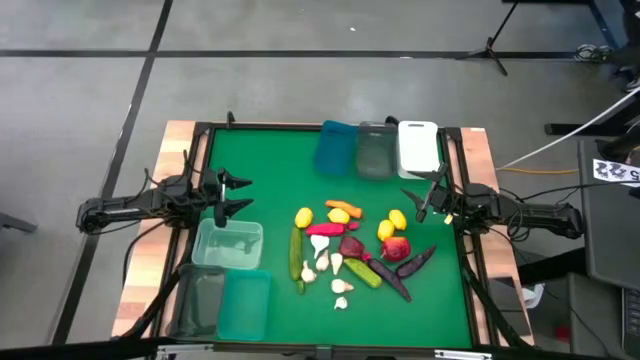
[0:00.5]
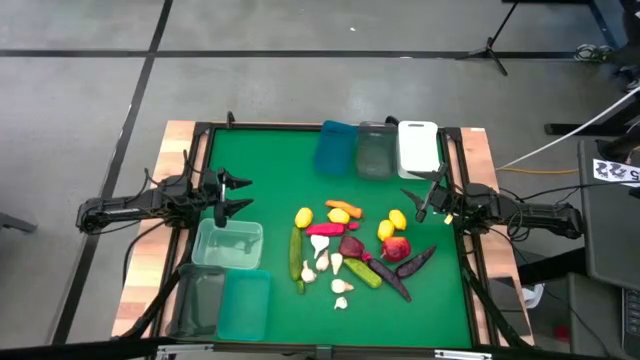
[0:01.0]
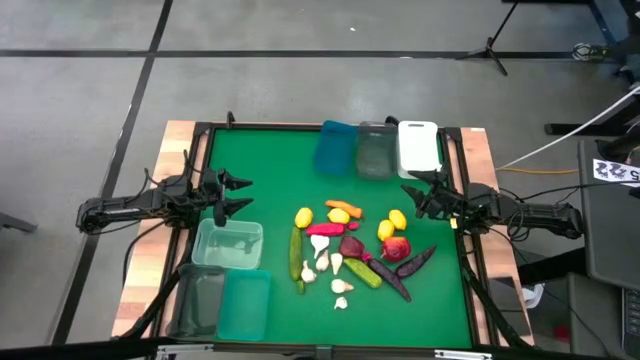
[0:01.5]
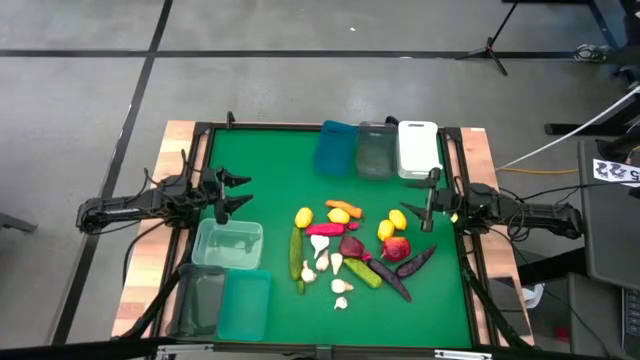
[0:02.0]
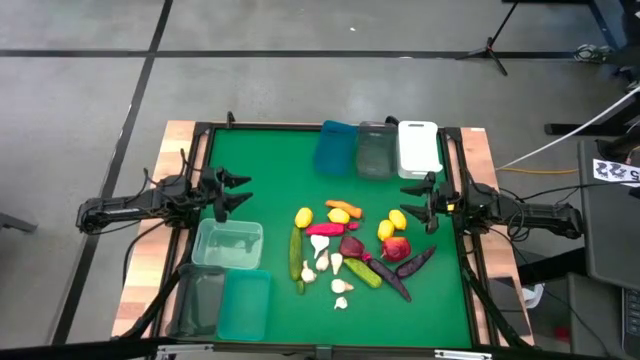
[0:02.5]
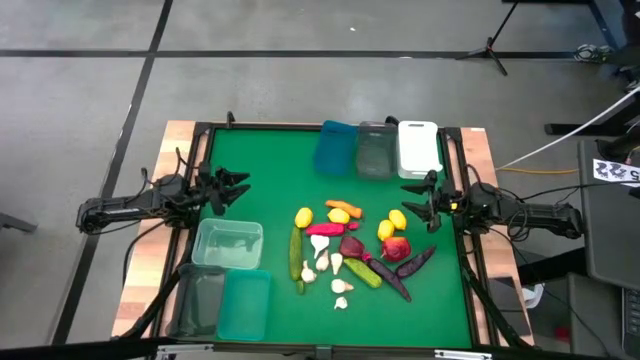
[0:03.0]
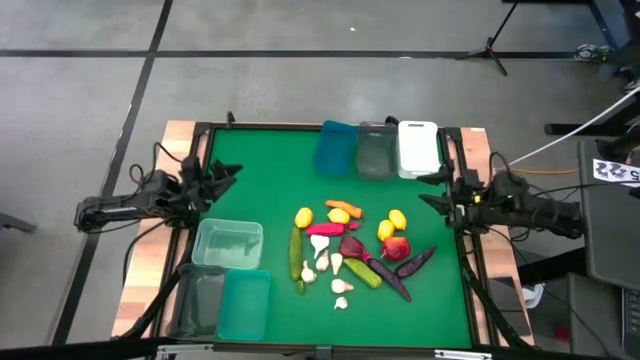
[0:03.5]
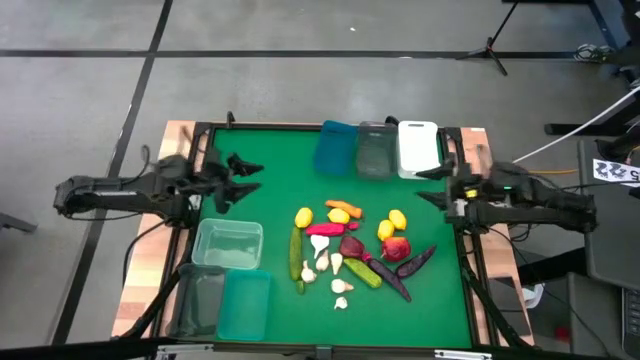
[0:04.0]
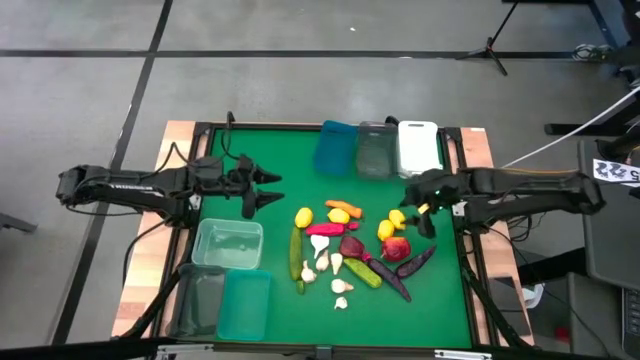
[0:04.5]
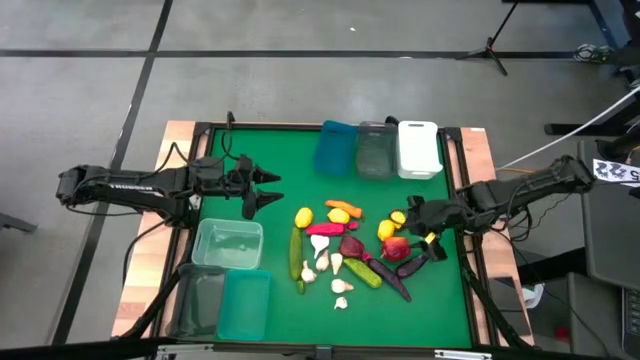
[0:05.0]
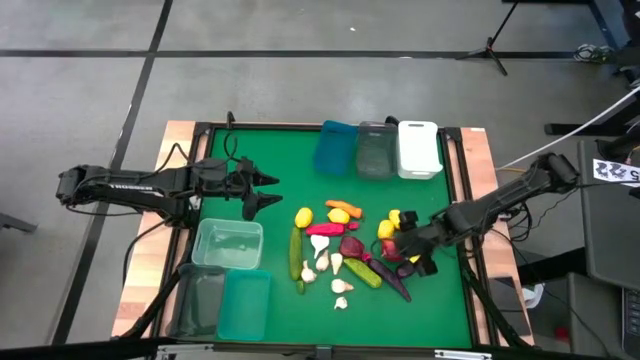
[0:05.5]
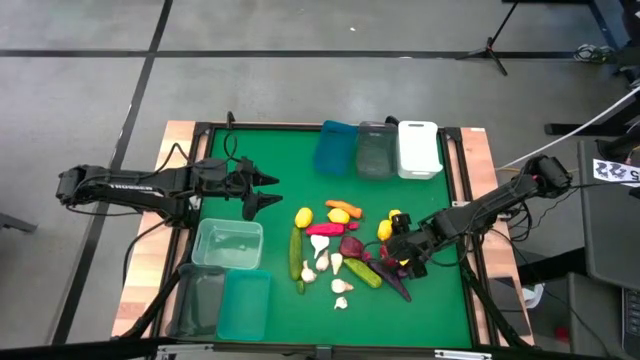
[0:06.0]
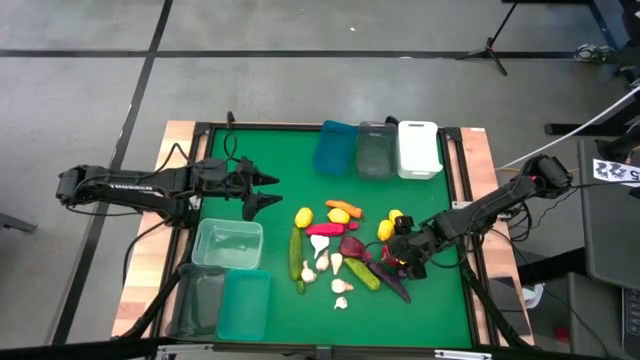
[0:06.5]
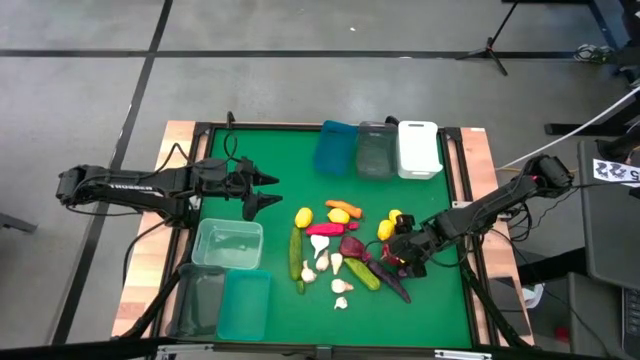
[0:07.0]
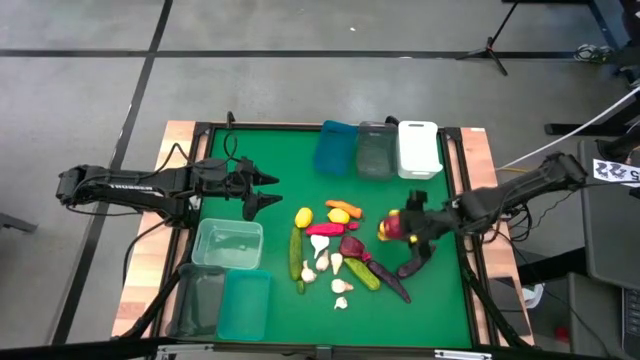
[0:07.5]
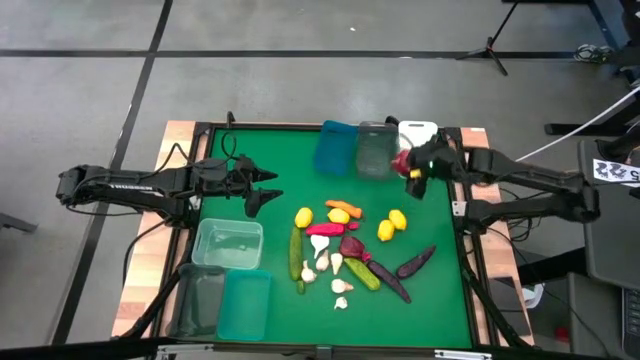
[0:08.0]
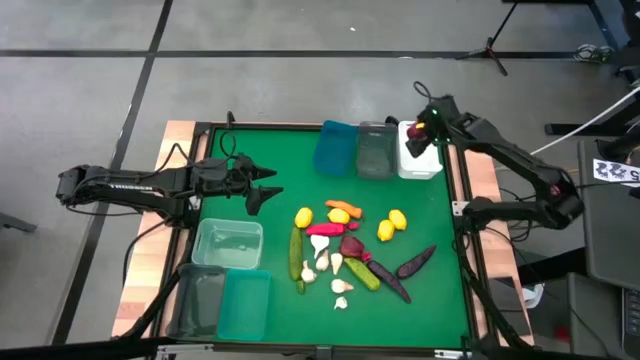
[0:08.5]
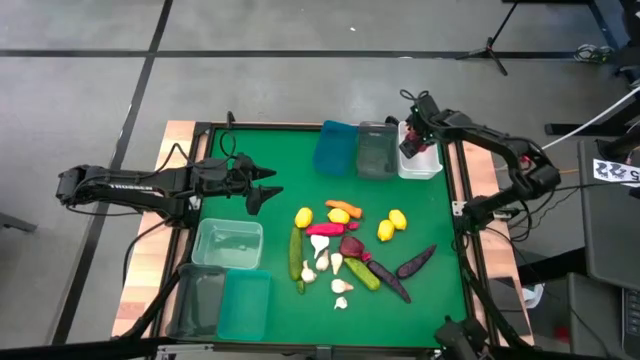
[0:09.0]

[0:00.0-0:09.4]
Task: Sort produce into baskets
Put the red apple into the white bin

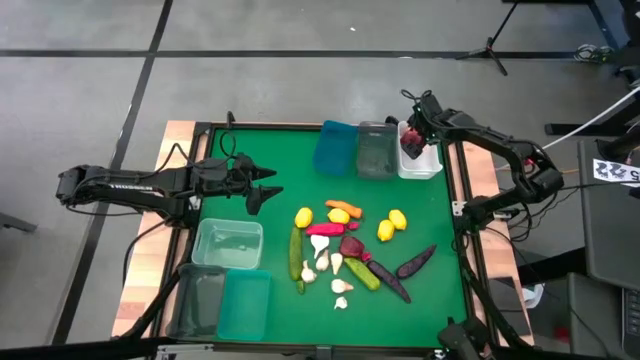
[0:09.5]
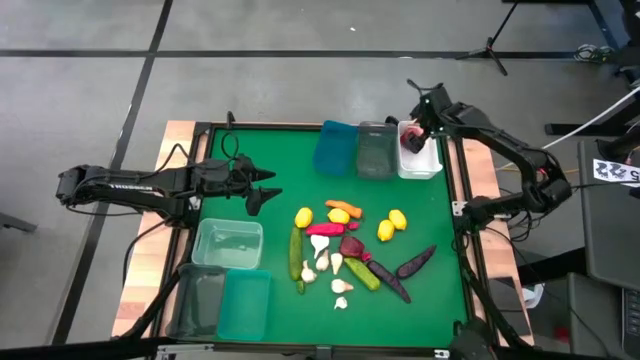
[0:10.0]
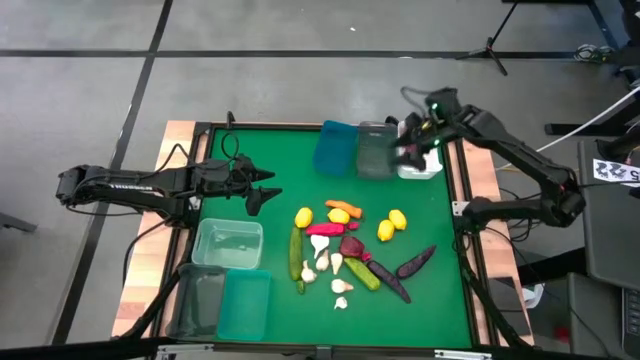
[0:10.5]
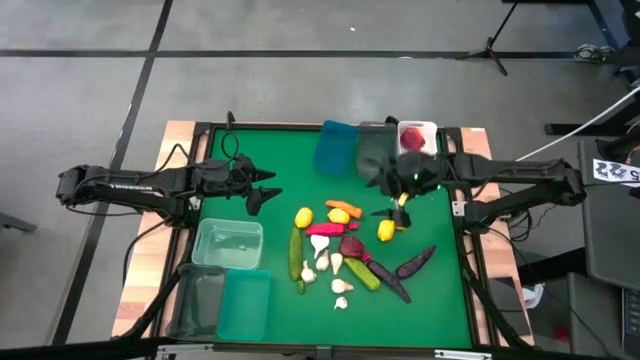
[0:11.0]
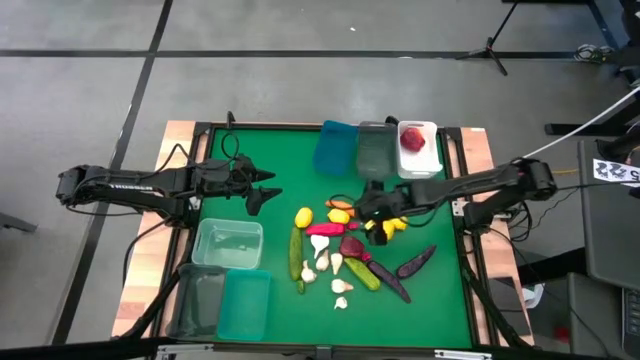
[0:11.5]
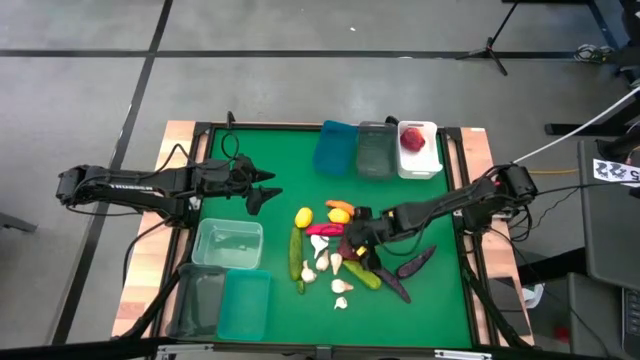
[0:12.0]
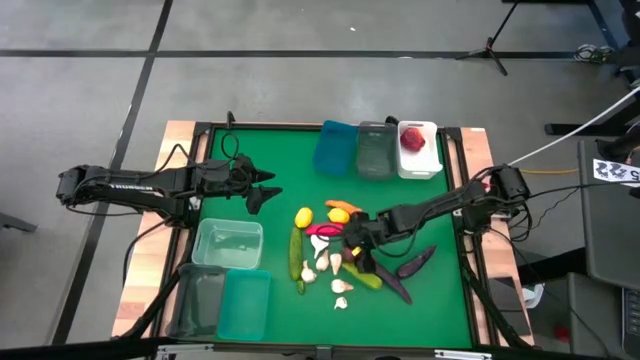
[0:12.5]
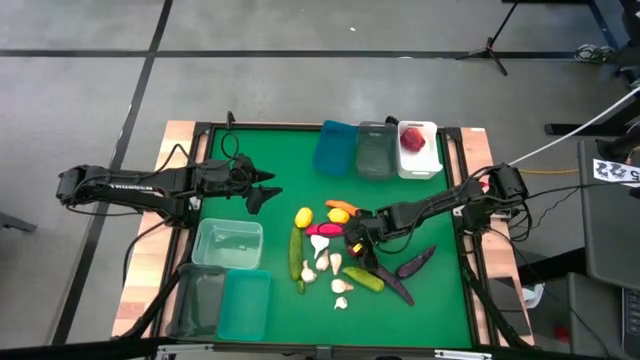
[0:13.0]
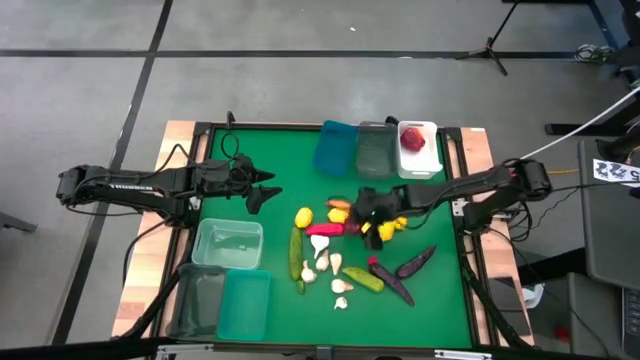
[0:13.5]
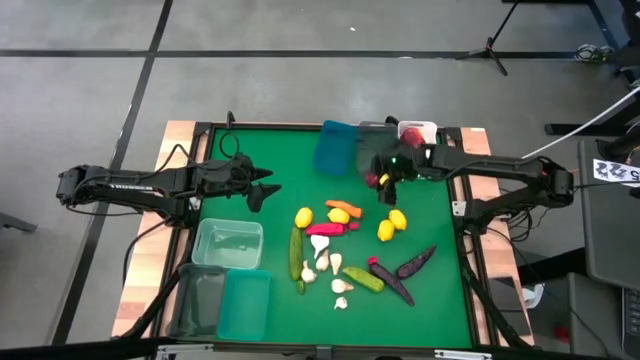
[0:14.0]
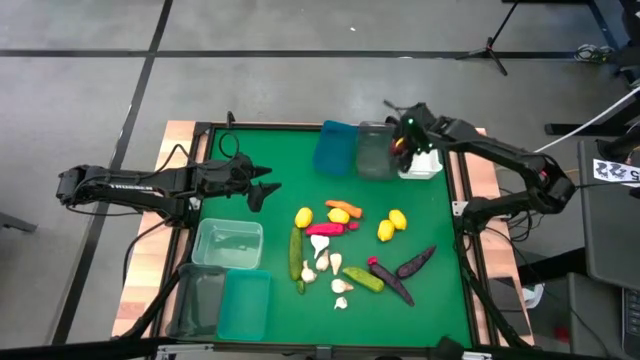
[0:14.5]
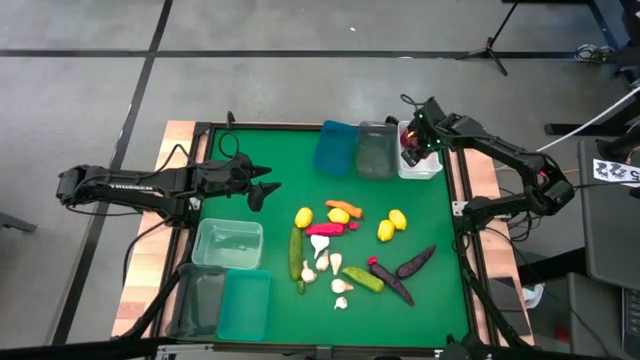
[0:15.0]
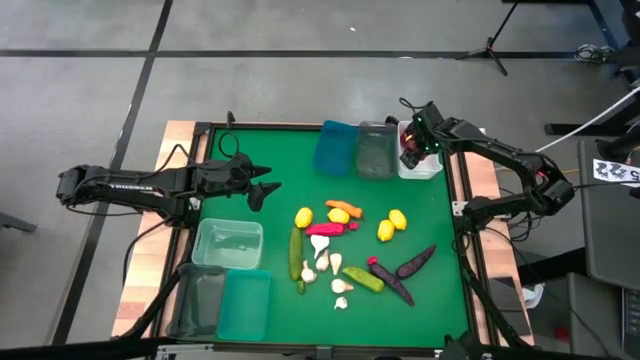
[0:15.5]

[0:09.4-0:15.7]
Put the red apple into the white bin

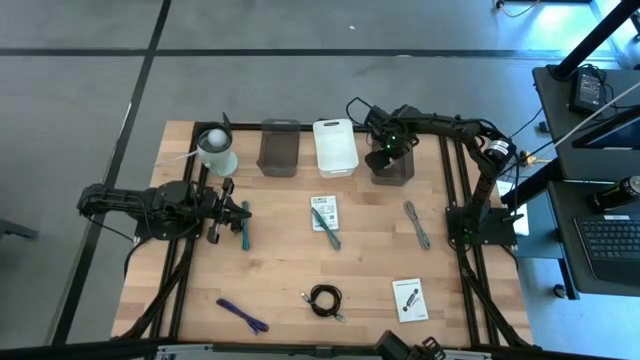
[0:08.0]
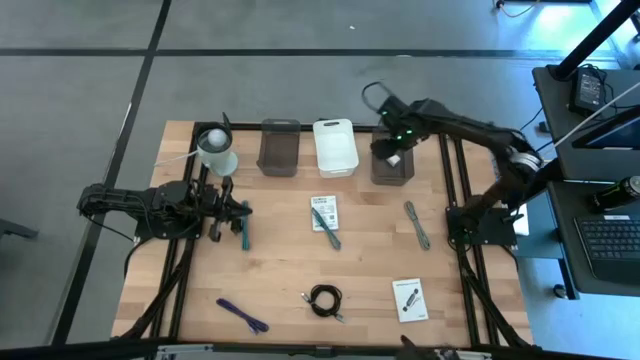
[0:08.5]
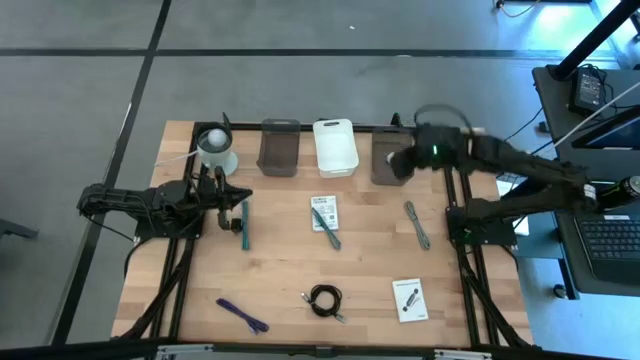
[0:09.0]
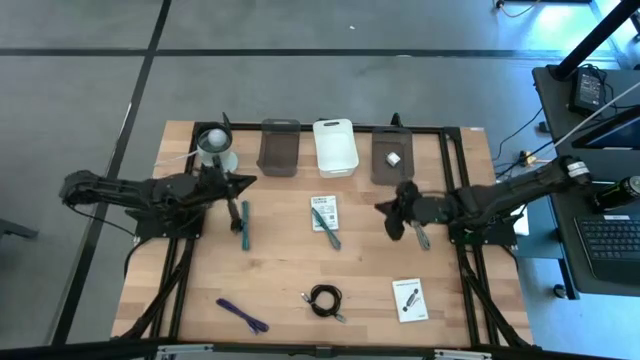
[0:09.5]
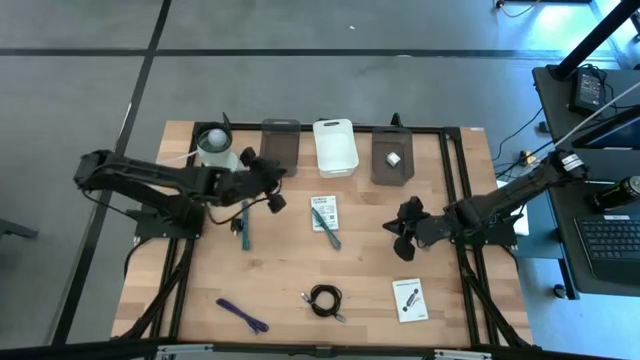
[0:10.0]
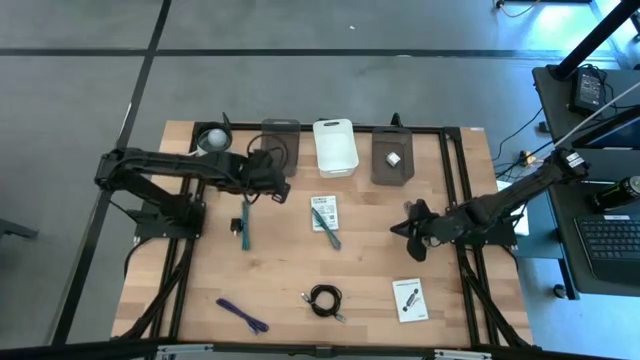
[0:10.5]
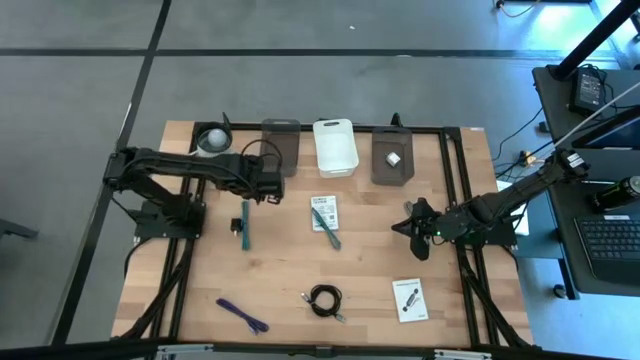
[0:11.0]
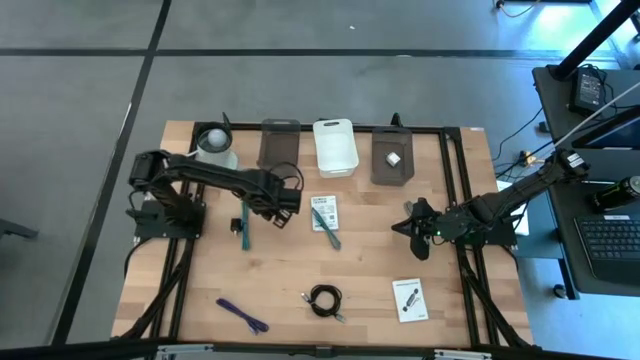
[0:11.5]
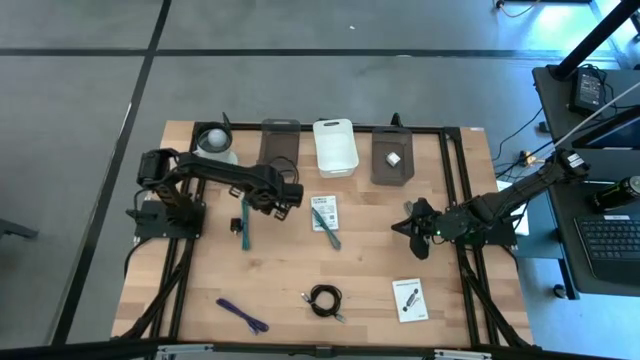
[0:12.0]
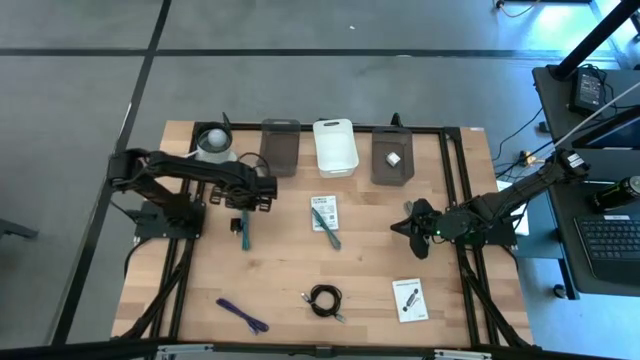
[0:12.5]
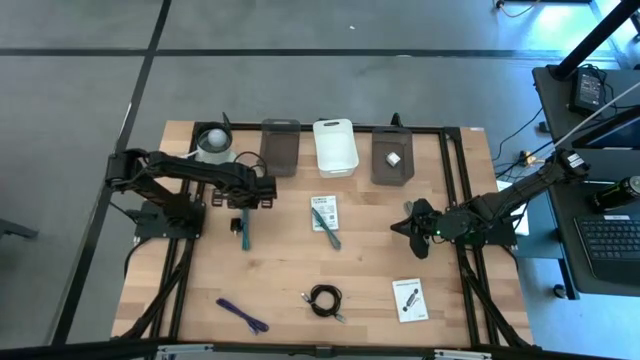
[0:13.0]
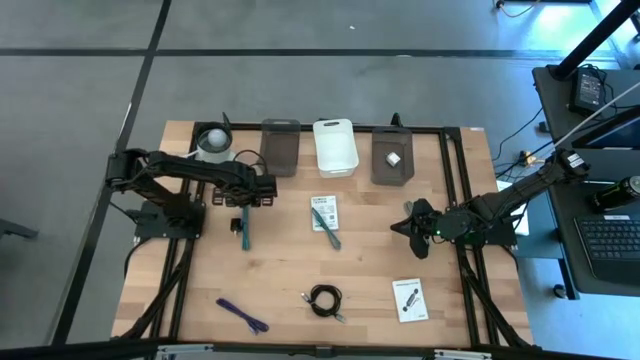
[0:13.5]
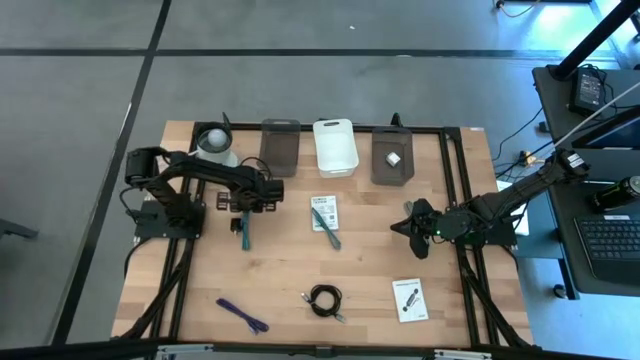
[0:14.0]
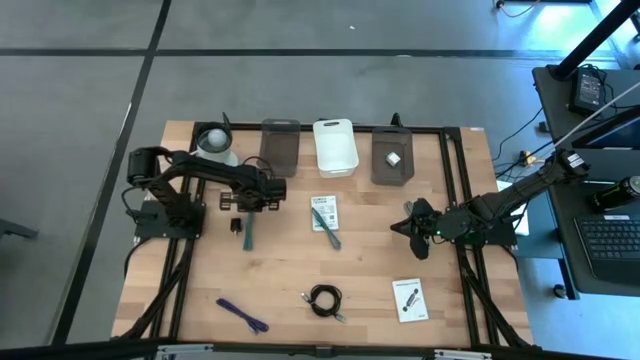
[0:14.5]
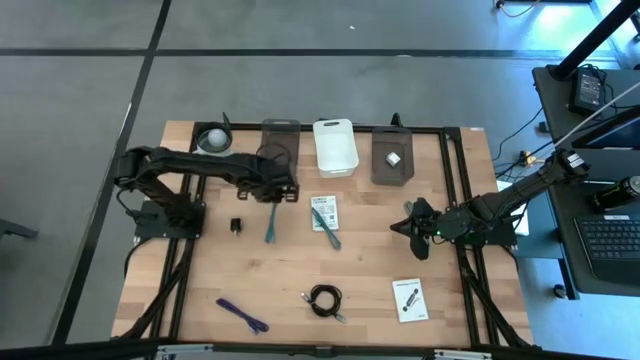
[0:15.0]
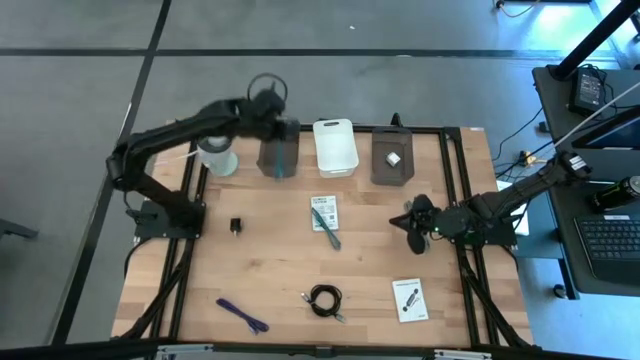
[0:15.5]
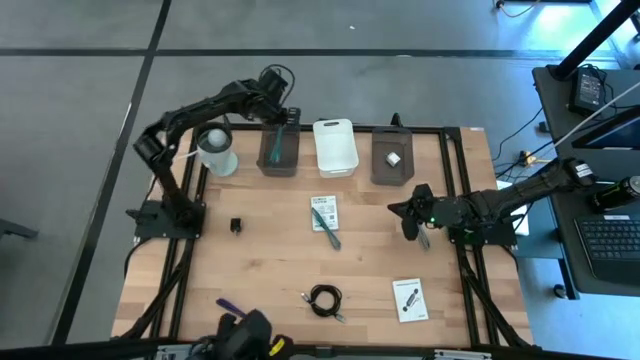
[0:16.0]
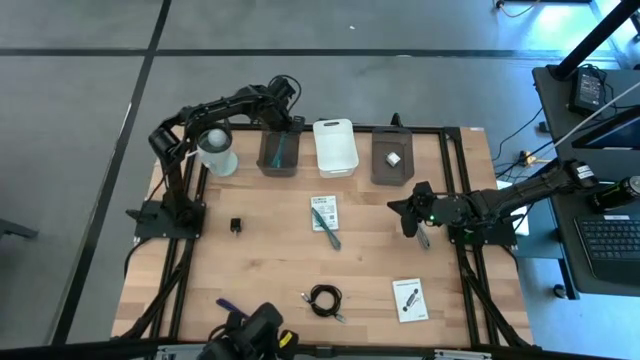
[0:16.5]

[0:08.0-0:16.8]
Task: Pick and place items into bin
Put the left blue charger cable into the left black bin
